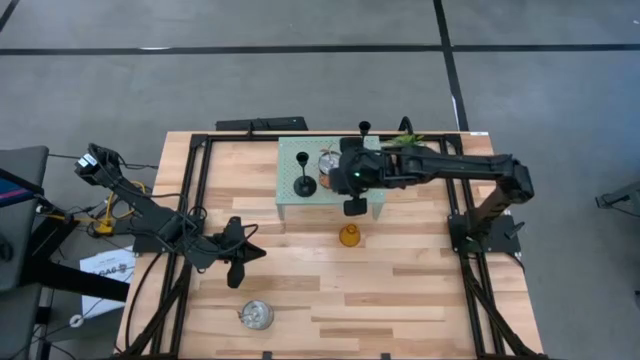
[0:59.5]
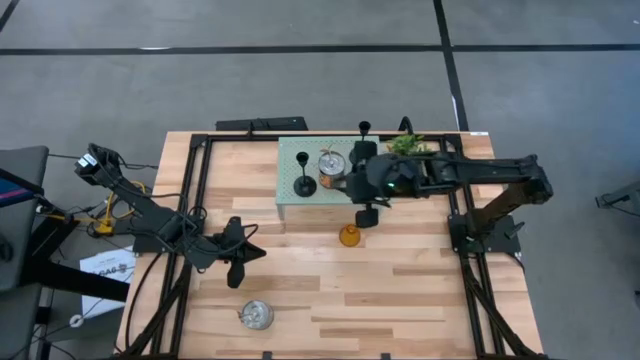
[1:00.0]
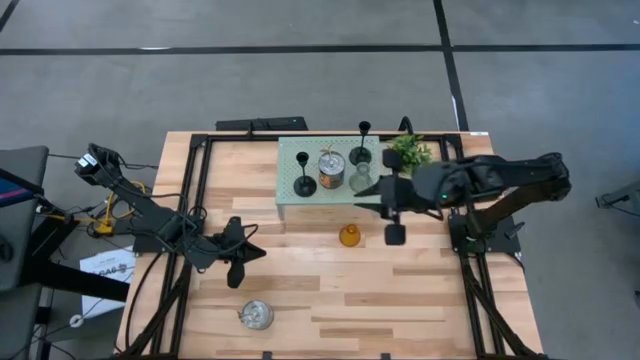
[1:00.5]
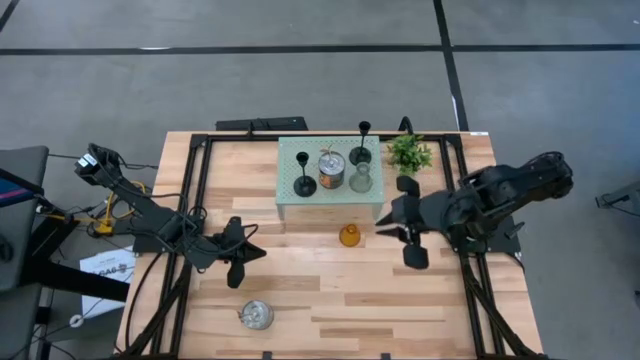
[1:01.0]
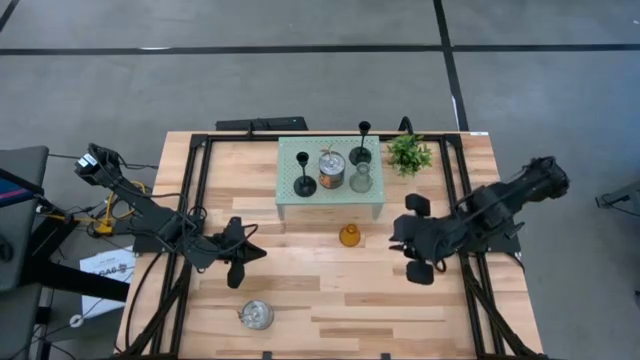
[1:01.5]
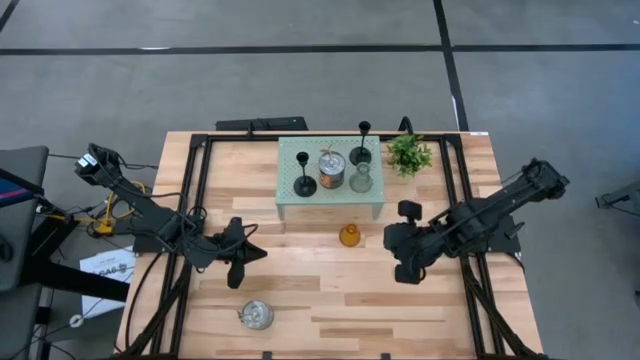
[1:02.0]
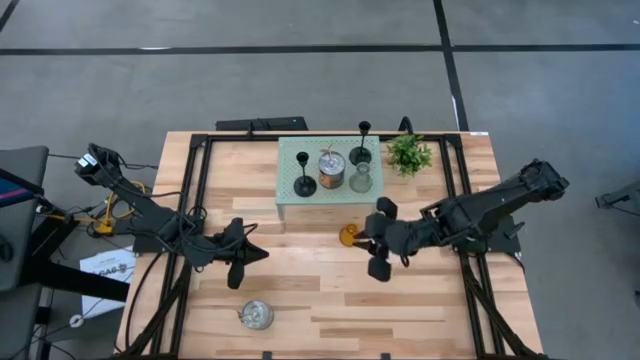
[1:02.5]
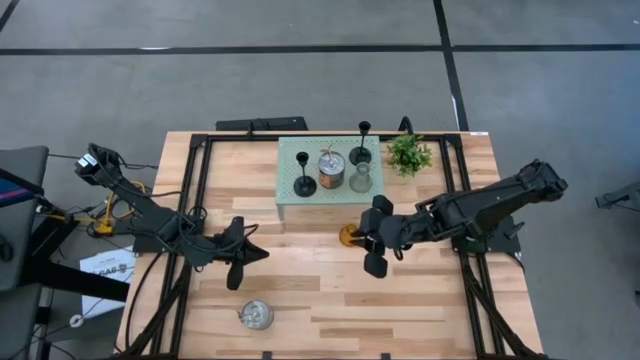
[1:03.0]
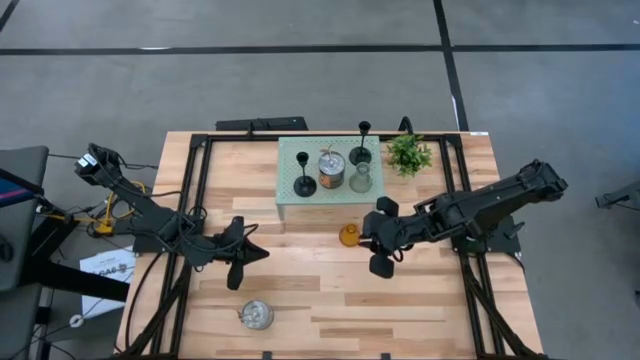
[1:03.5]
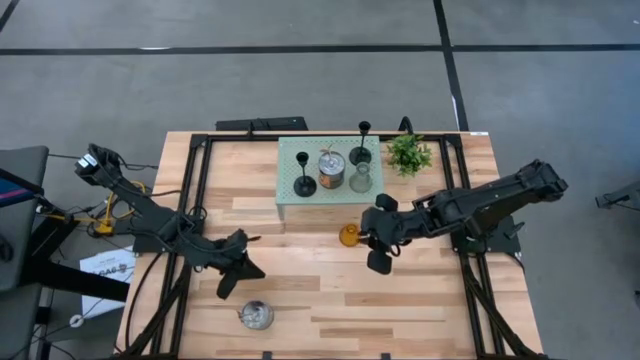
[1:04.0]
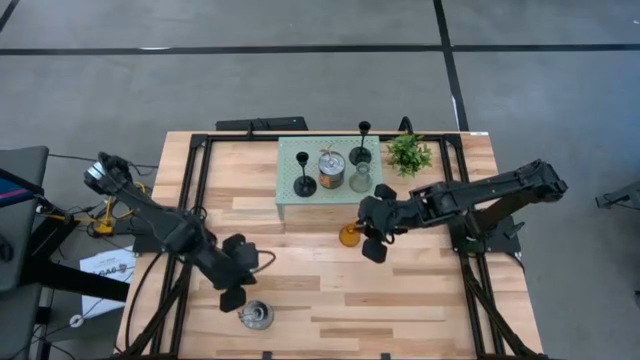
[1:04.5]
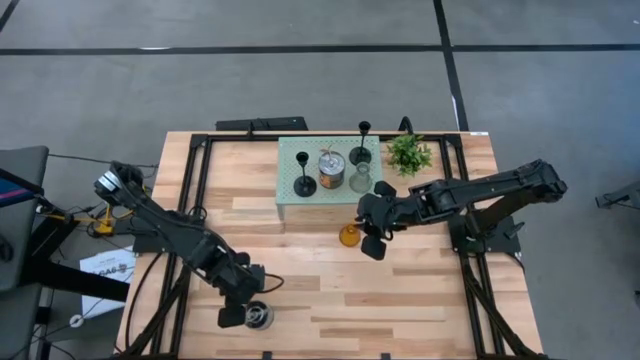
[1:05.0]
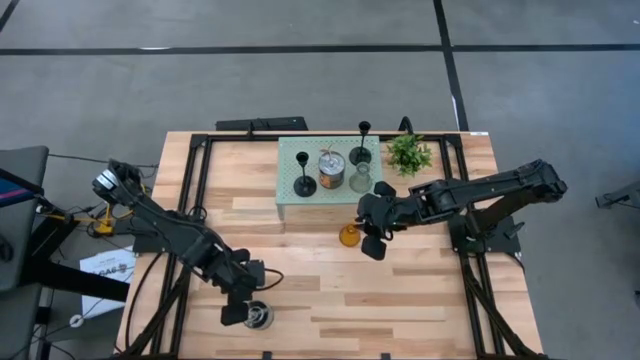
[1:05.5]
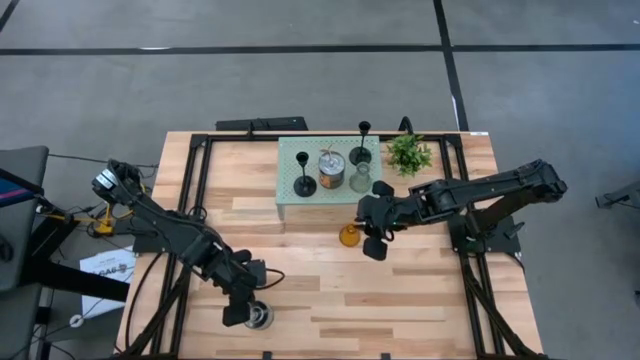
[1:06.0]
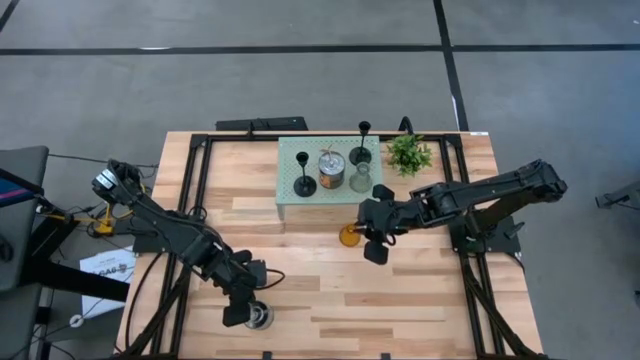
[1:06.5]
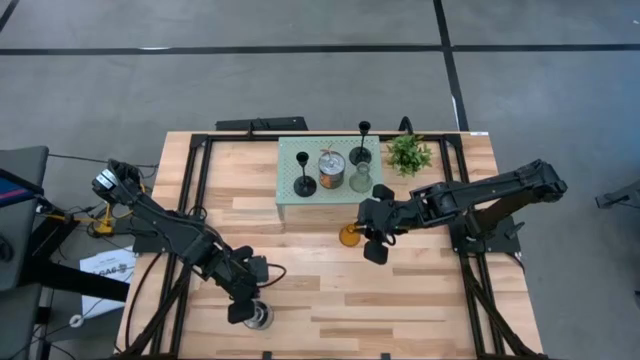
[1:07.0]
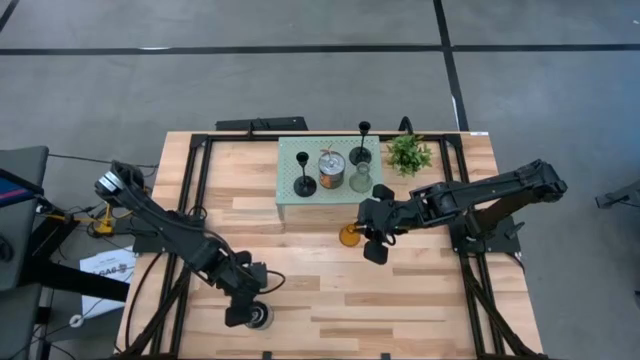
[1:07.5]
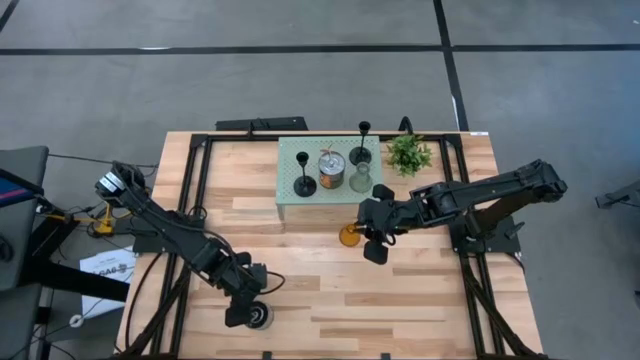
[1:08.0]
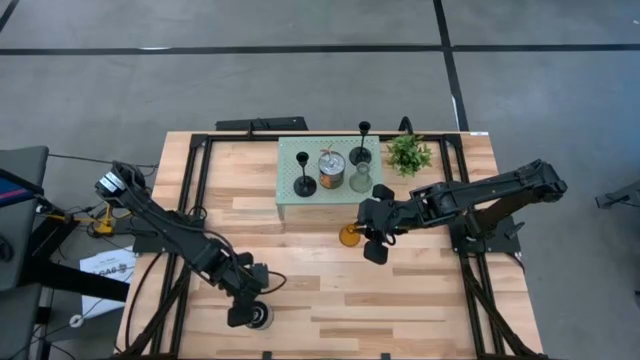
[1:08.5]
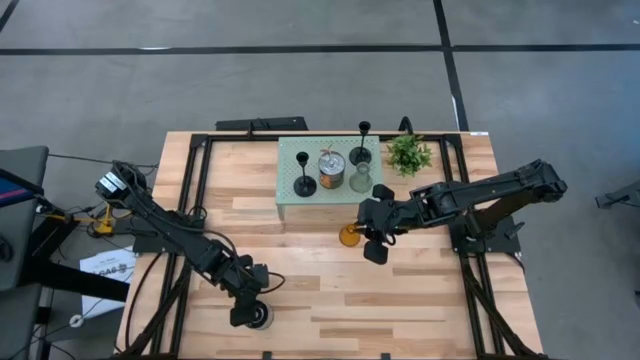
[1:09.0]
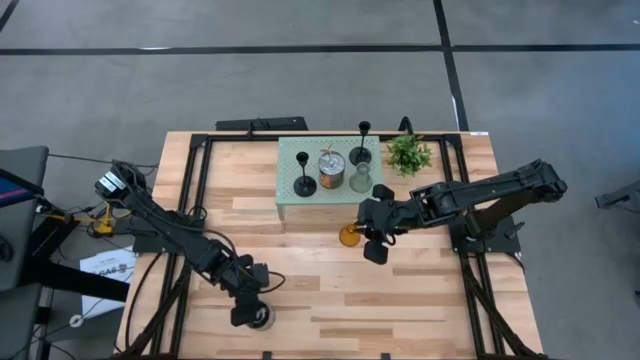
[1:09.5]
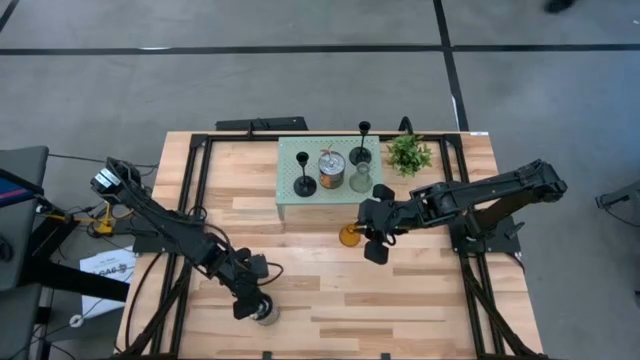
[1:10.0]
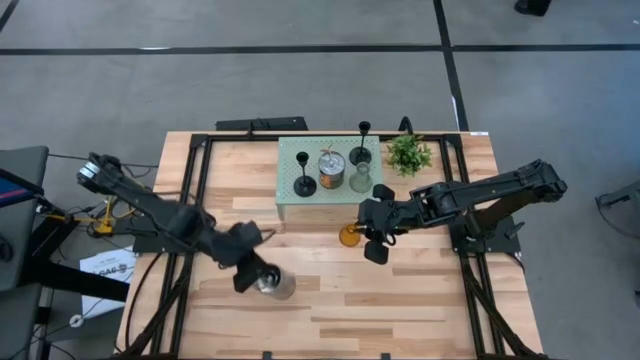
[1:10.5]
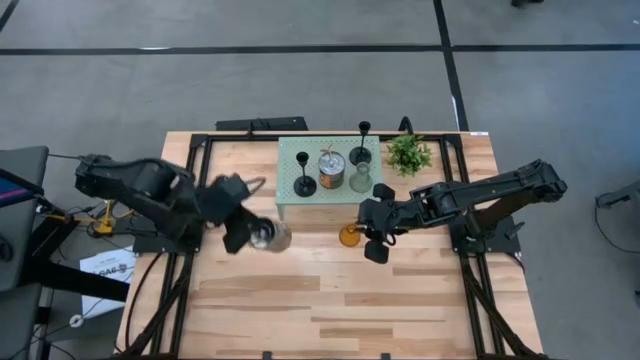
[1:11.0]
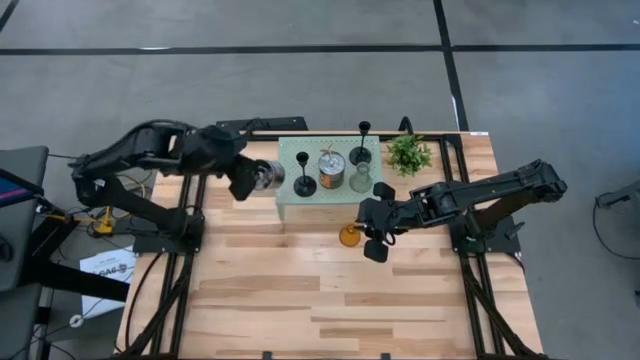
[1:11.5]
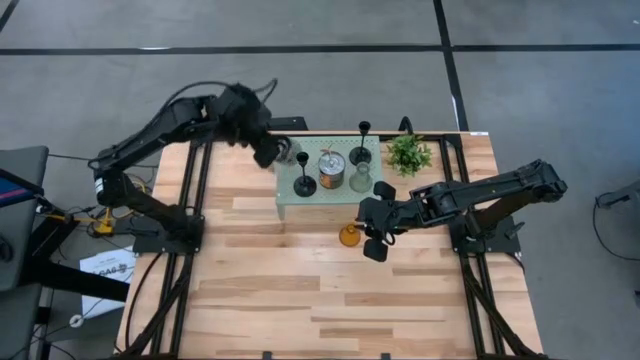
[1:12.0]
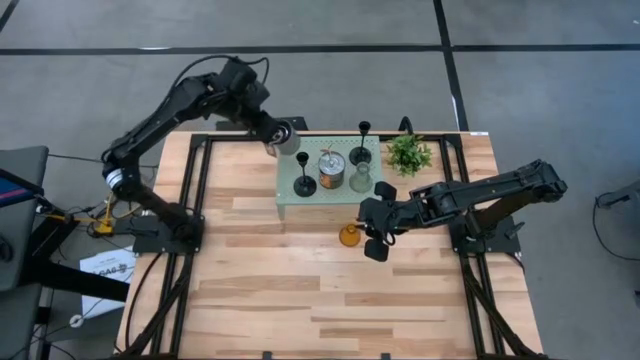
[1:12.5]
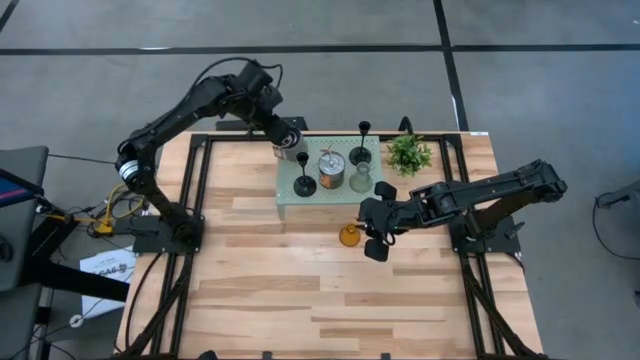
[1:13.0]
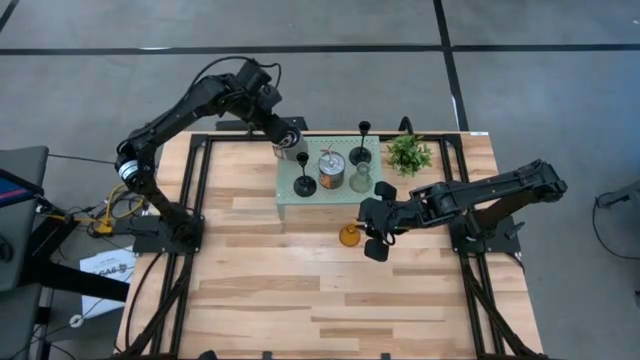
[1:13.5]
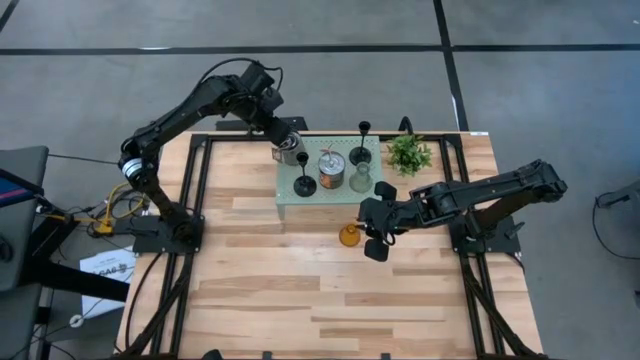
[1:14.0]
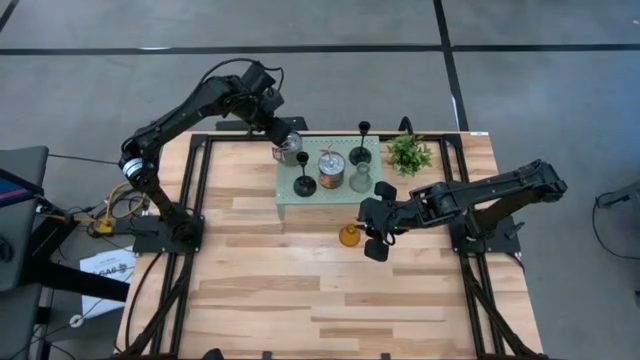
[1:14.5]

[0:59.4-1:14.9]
Task: Pick & Place candle stick holders
Put the brown scented candle on the shelf

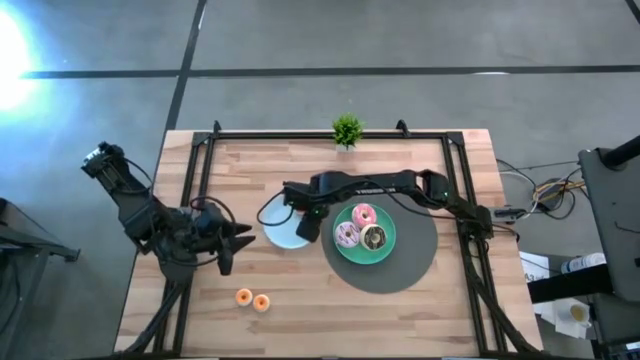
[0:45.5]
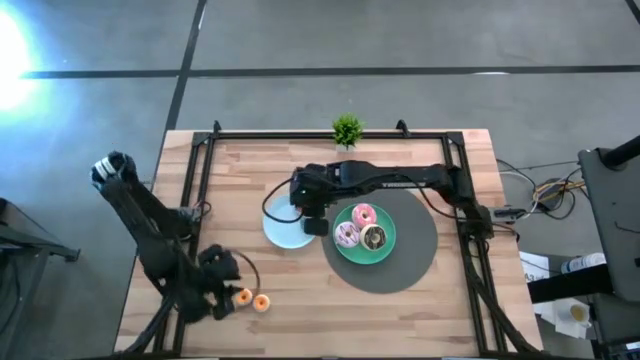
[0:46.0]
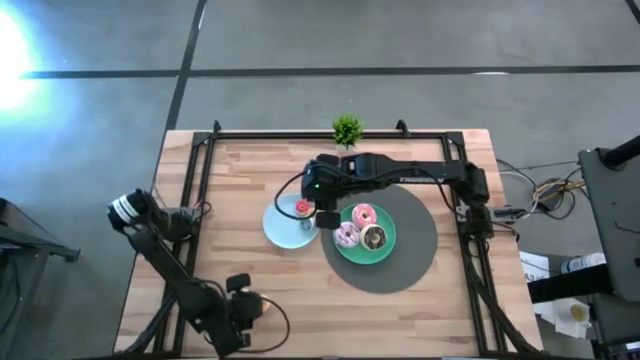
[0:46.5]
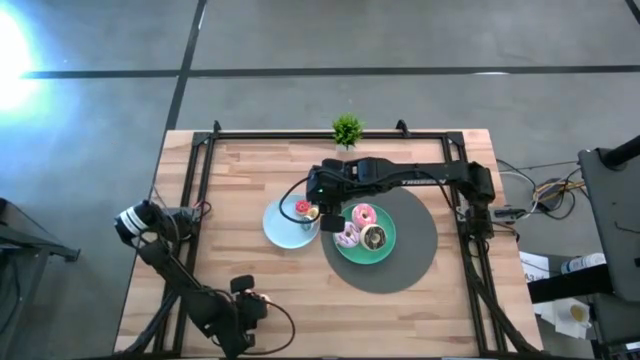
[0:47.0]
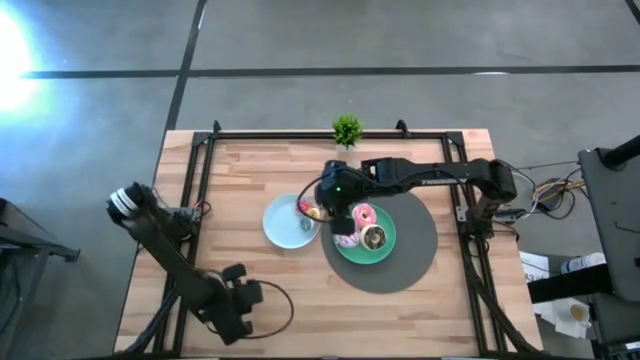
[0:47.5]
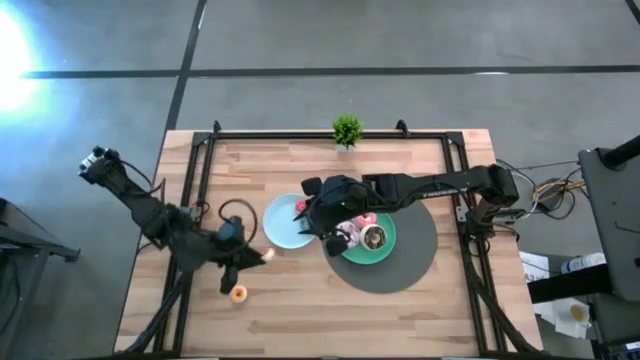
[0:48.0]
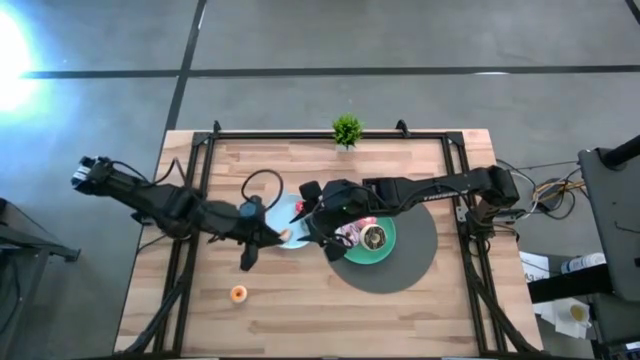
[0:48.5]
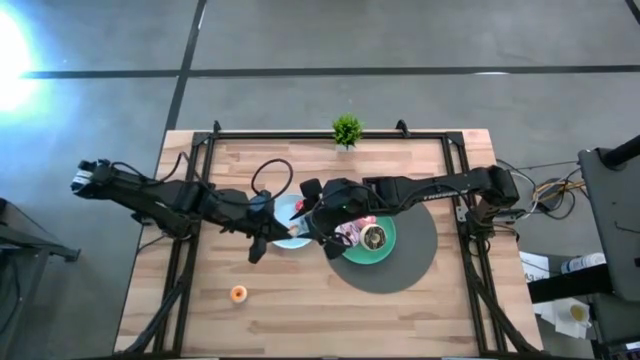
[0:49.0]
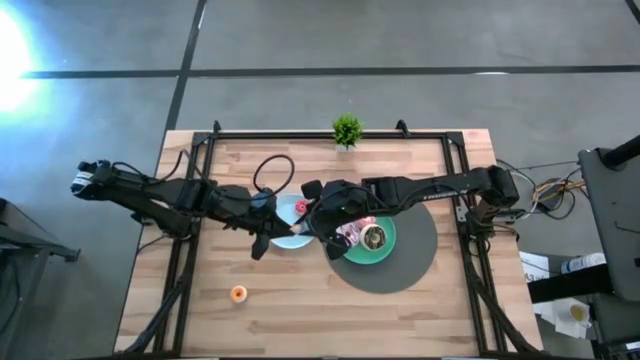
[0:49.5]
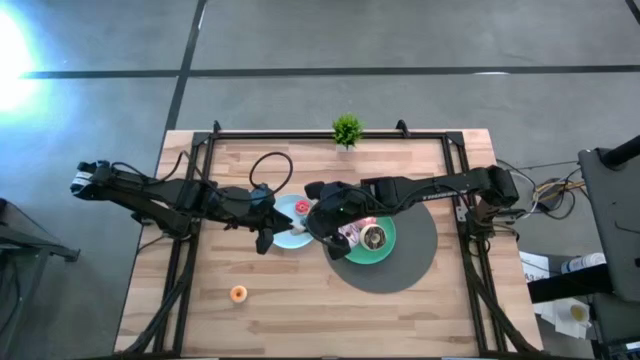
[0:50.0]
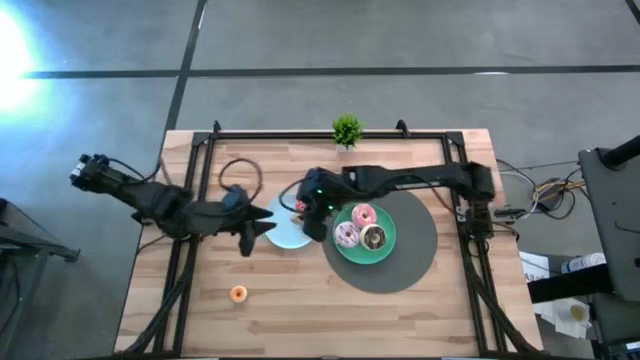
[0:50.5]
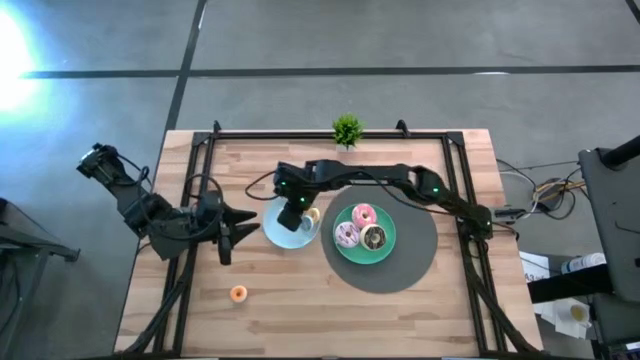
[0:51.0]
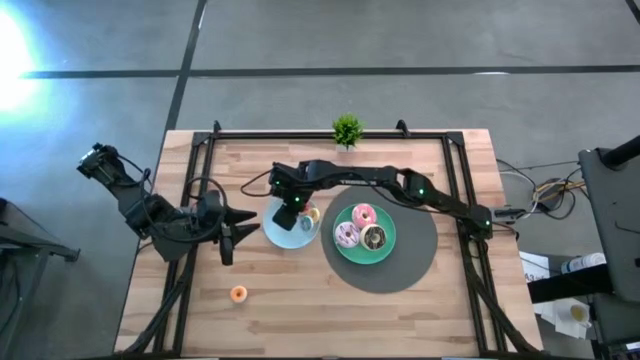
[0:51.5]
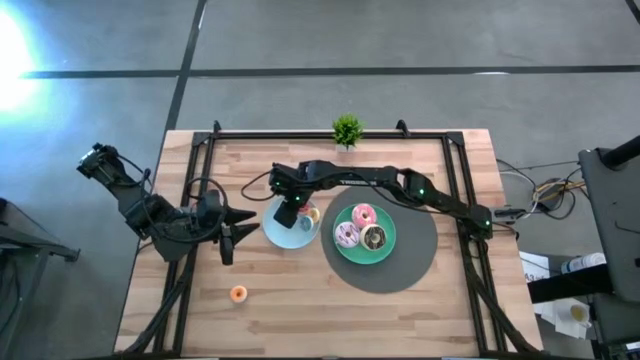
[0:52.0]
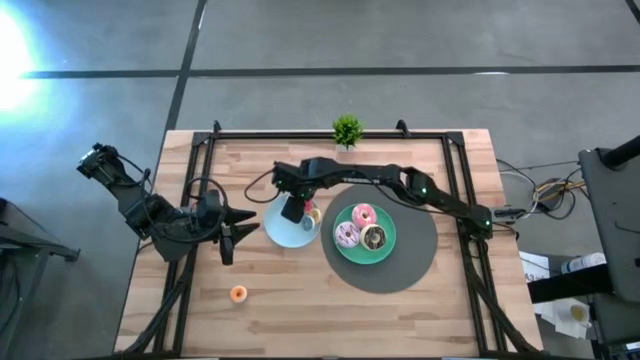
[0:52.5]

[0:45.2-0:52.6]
Task: Pick & Place donuts
Put the small white donut on the light blue plate
